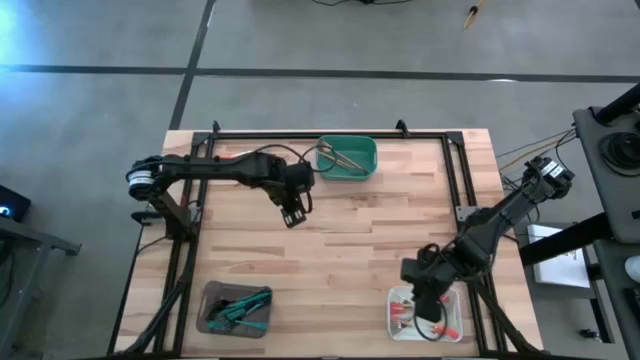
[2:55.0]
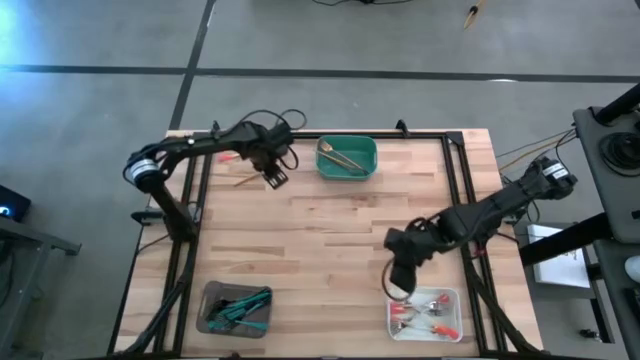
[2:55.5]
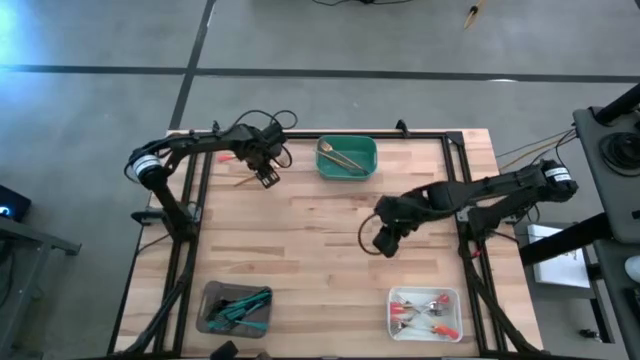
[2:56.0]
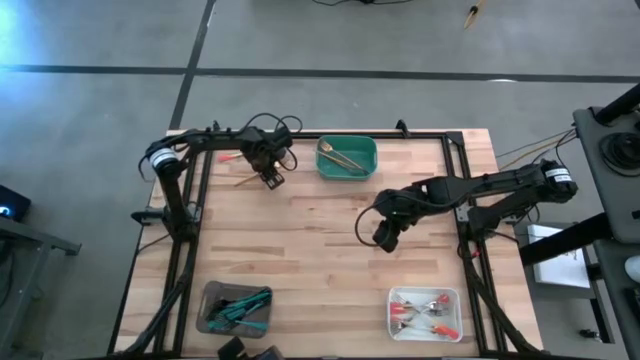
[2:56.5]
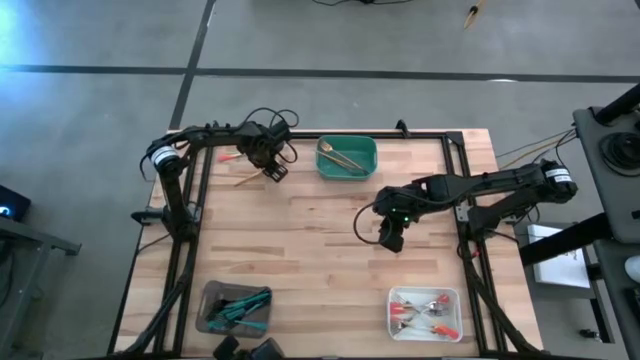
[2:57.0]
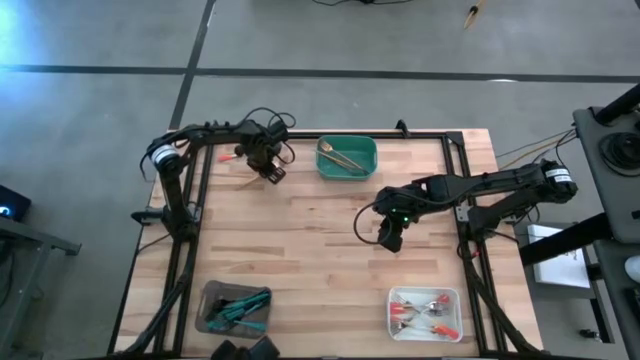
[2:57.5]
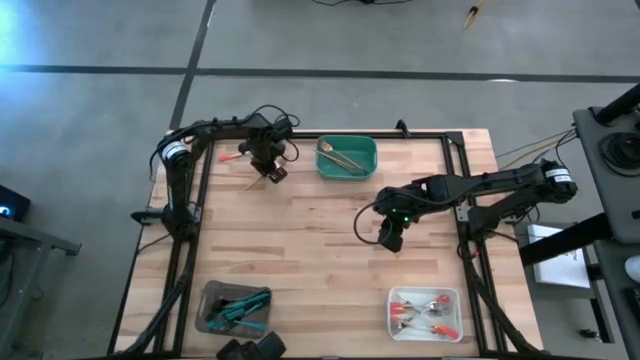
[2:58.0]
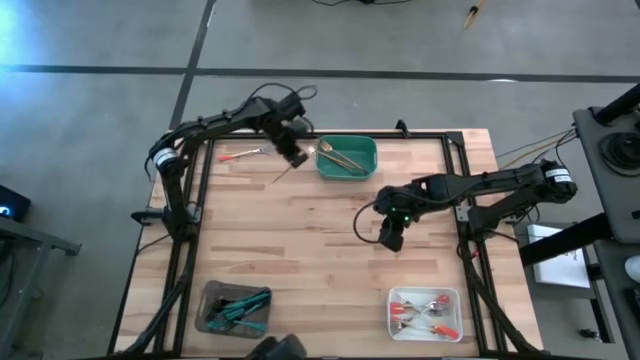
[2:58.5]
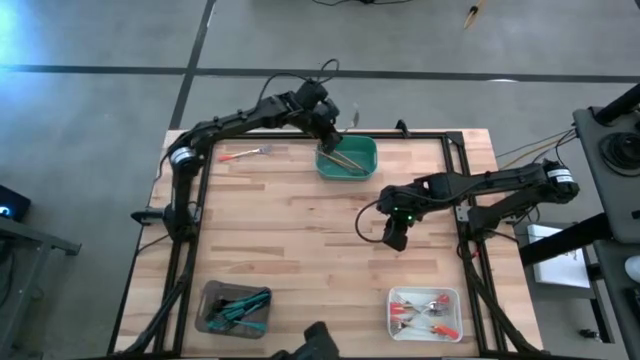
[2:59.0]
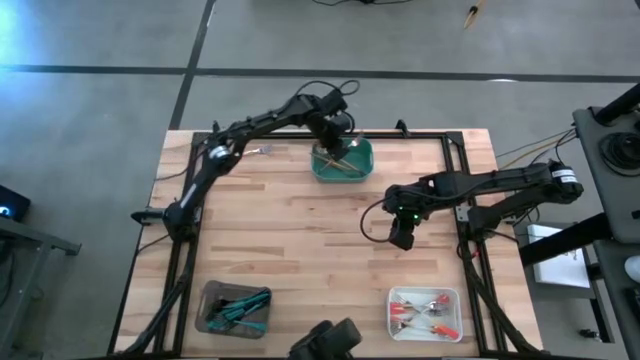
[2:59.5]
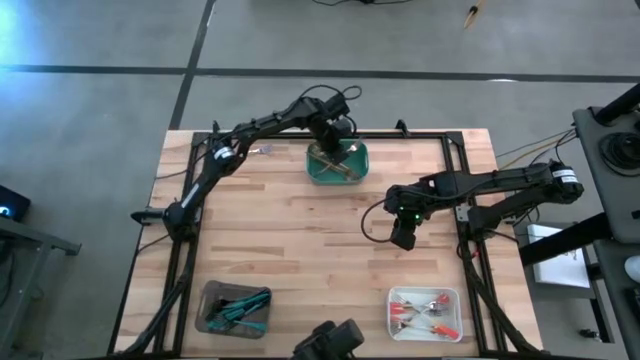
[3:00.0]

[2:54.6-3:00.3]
Task: Sort silverware by color (type)
Put the gold fork into the blue bin

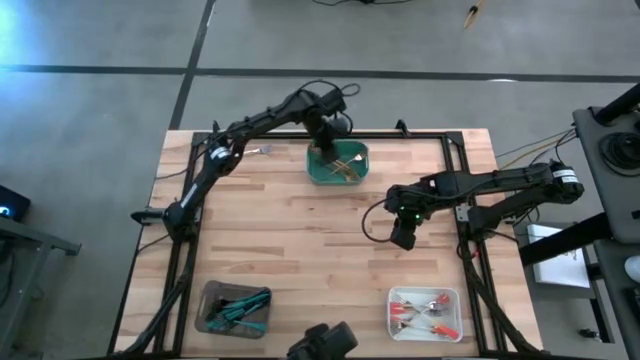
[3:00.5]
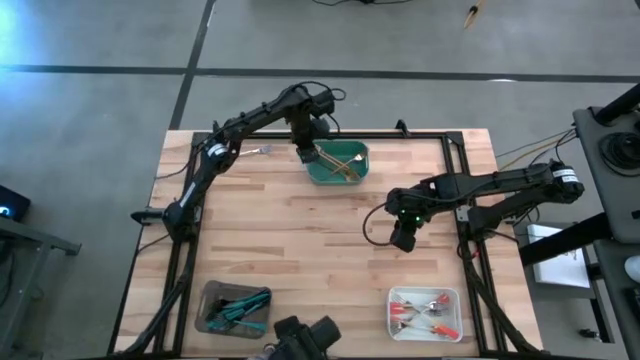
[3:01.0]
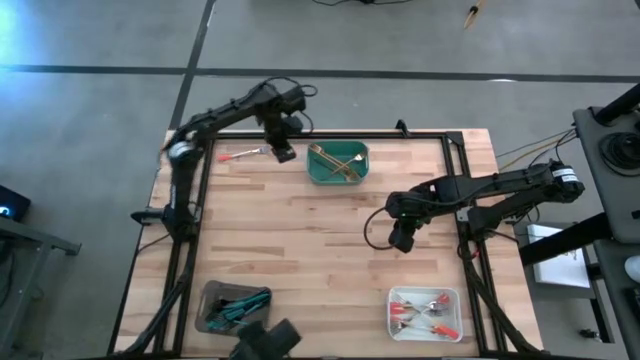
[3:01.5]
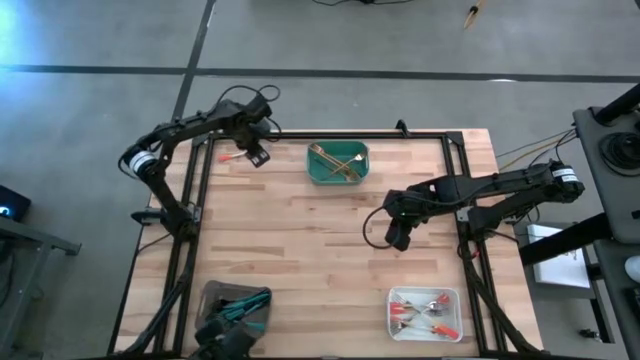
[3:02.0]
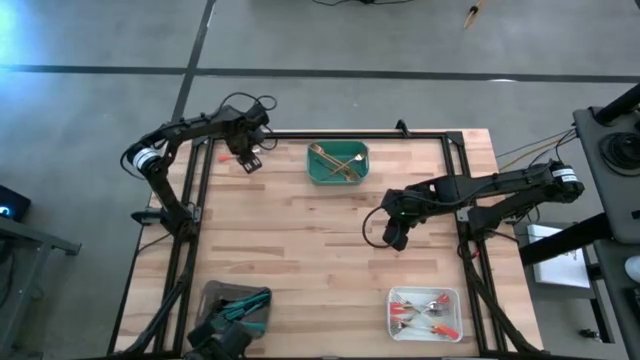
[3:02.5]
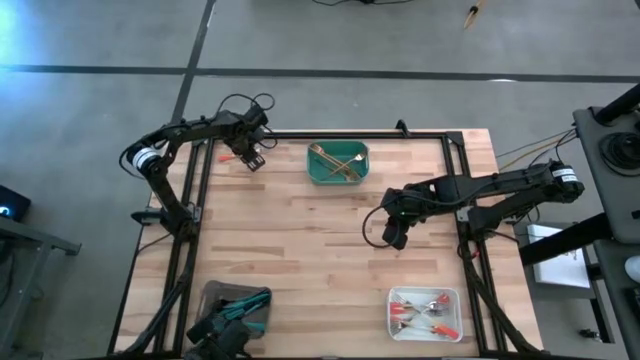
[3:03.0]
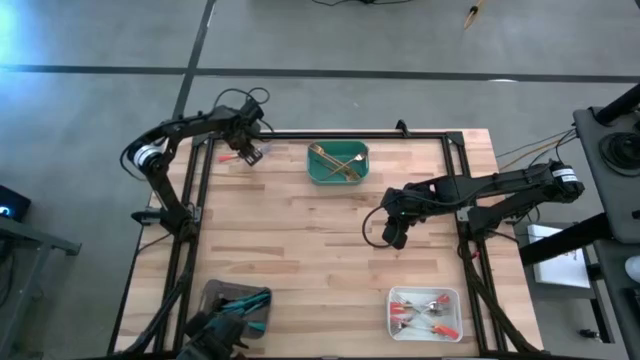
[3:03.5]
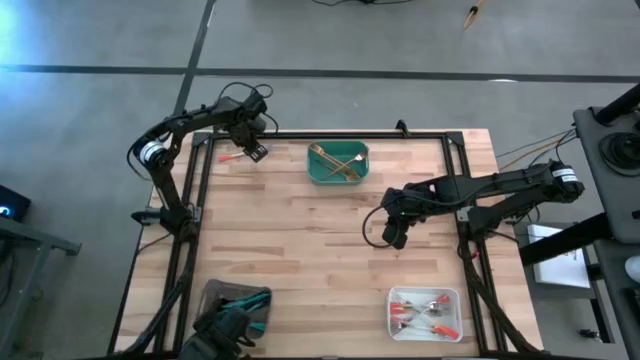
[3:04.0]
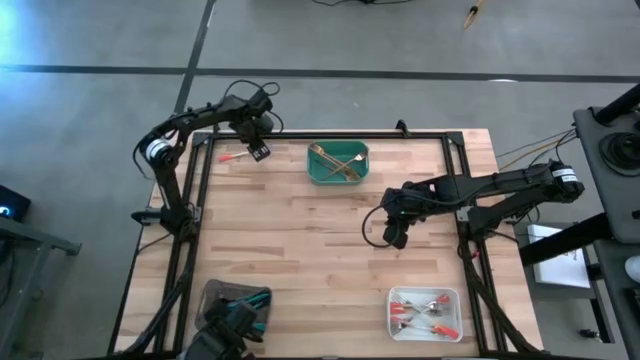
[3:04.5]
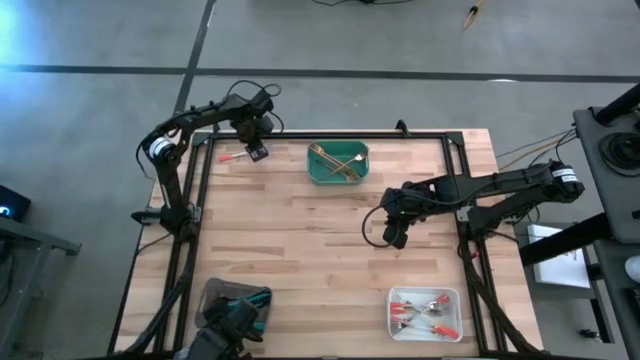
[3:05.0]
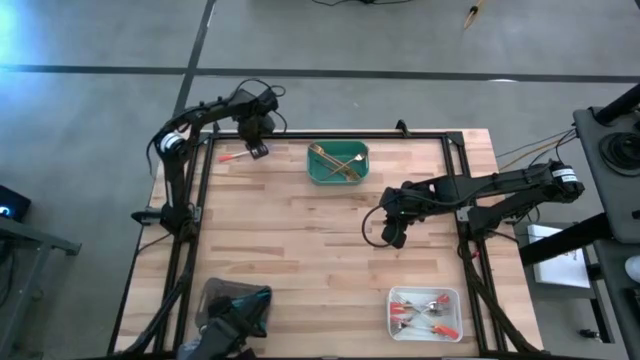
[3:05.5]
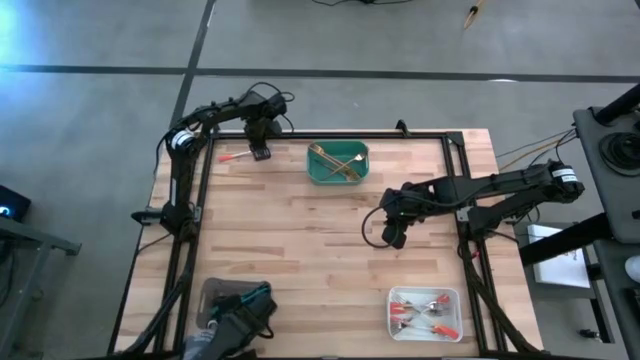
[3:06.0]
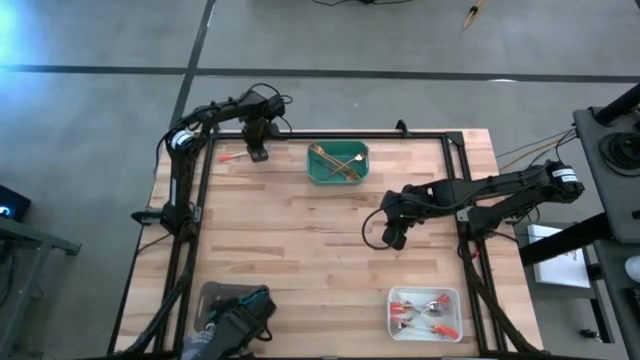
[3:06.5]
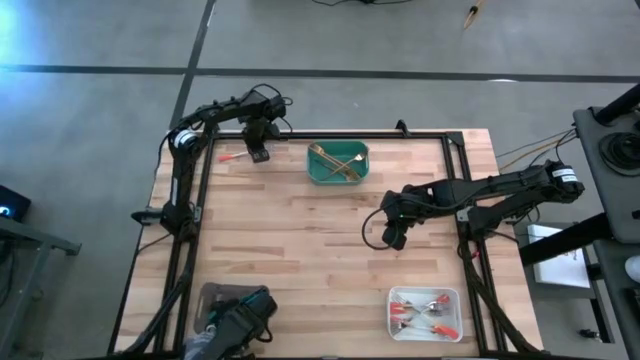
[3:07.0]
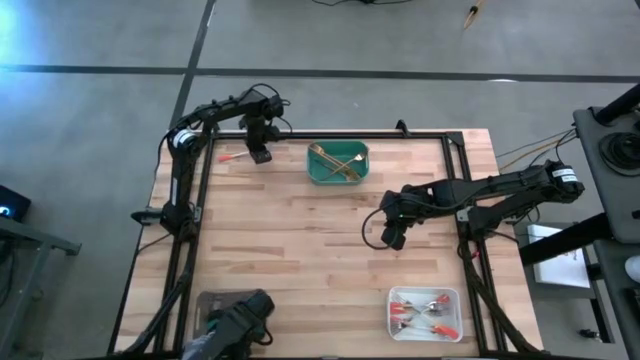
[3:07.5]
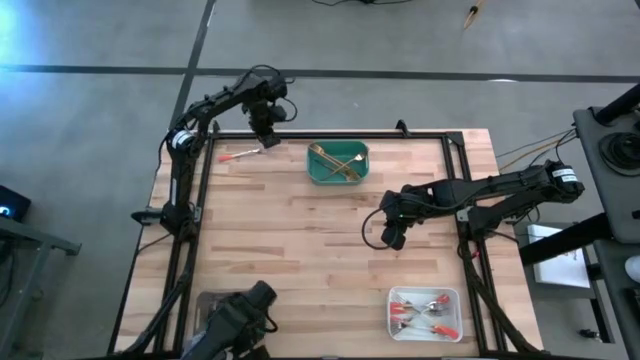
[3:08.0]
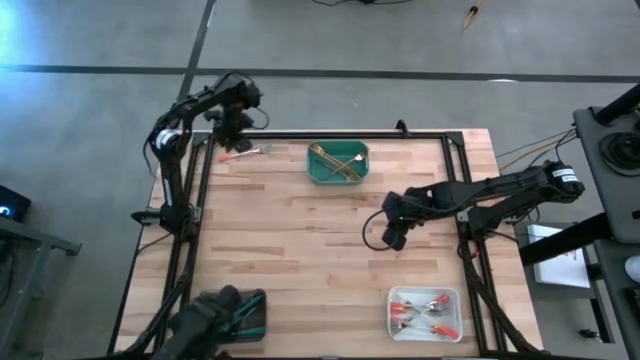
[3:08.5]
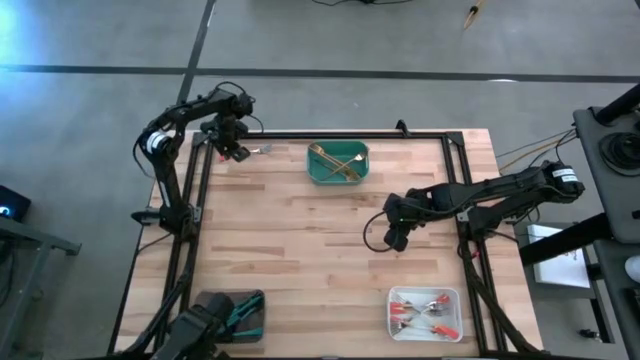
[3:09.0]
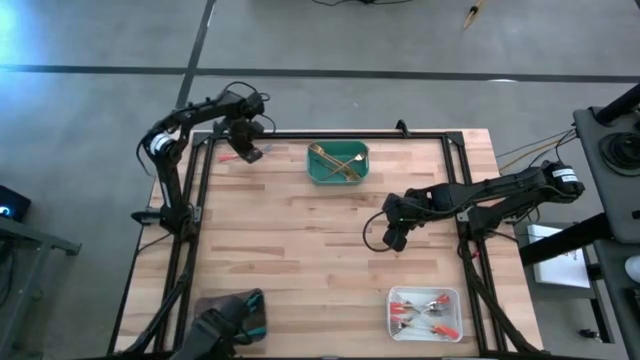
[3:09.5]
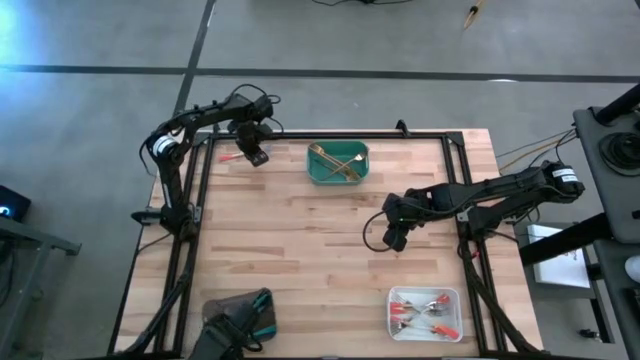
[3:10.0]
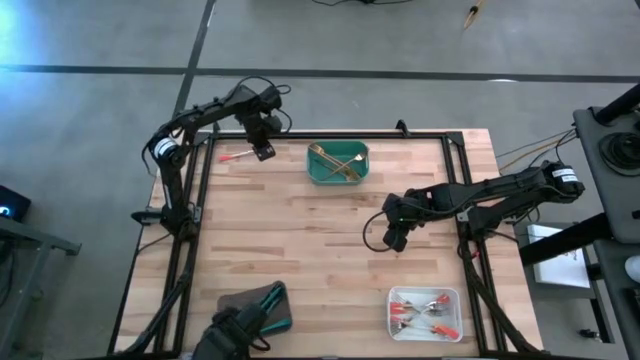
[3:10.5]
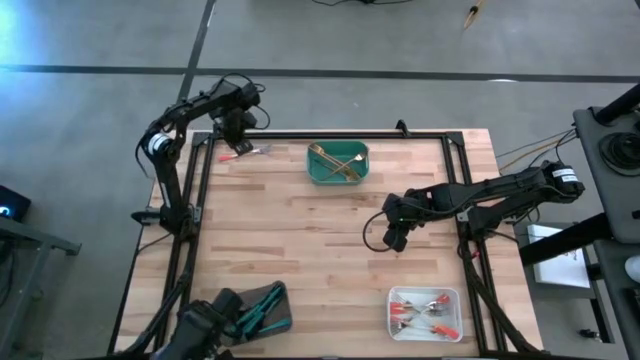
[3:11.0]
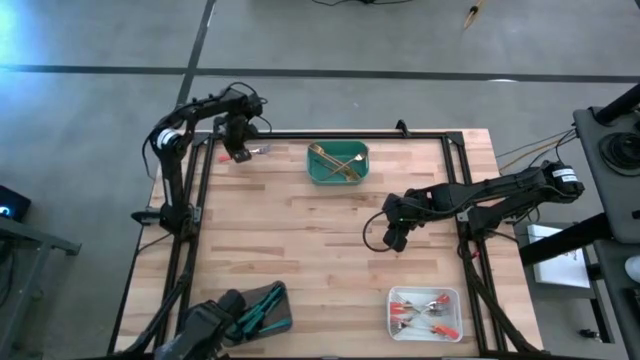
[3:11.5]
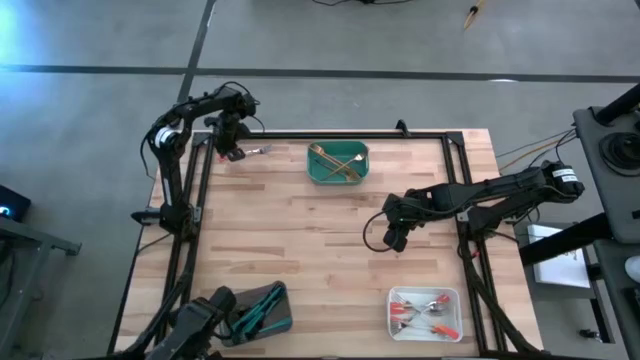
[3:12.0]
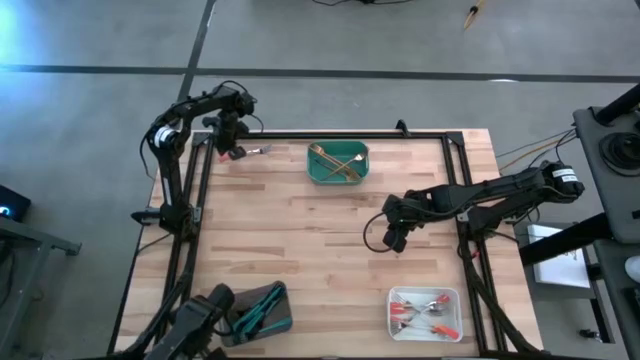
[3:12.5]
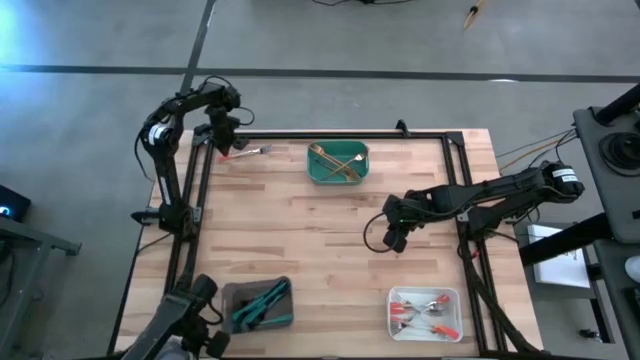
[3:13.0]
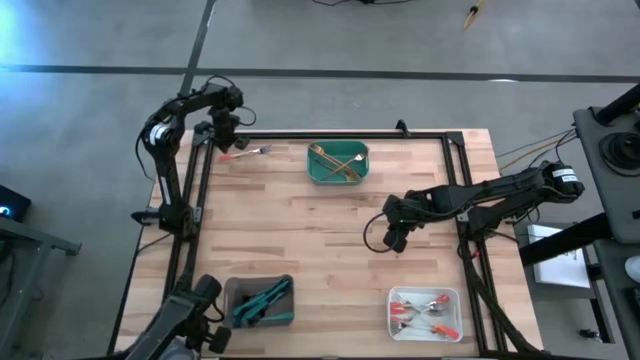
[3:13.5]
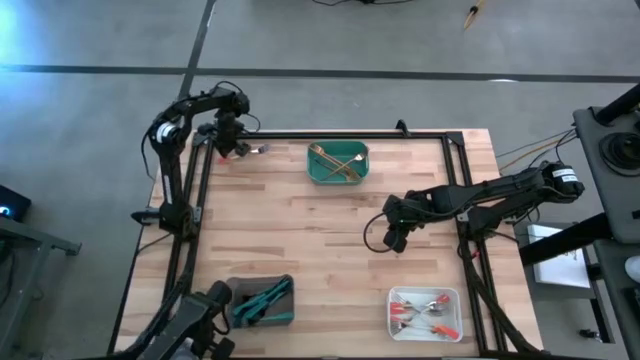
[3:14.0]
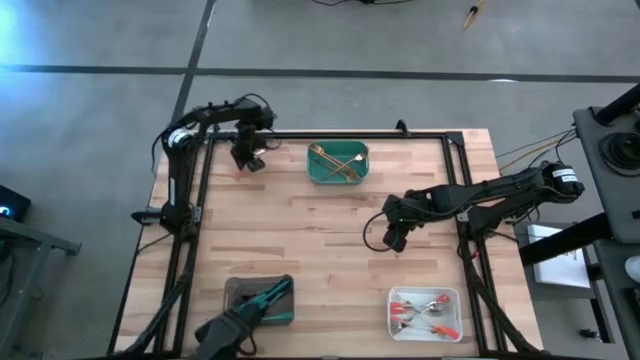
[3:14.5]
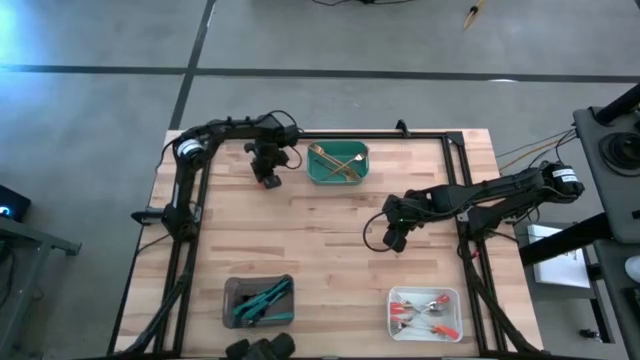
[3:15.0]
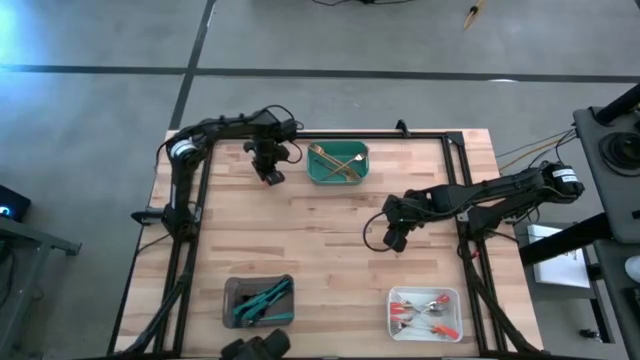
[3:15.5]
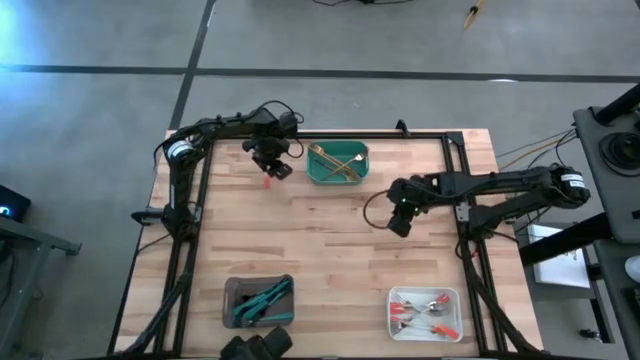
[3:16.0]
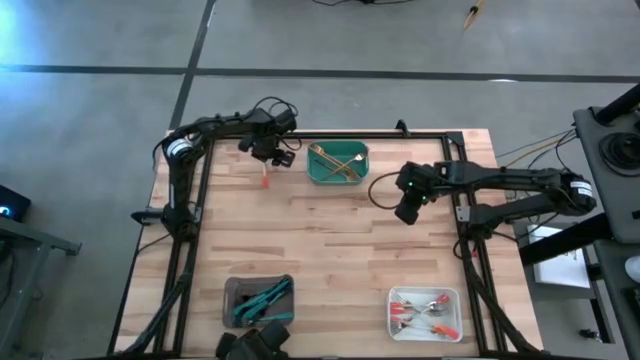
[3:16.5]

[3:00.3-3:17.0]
Put the orange fork into the white bin
